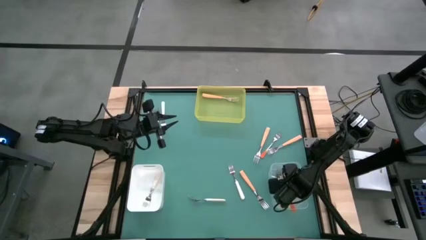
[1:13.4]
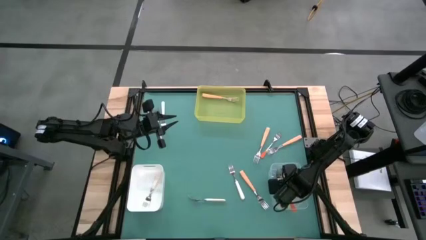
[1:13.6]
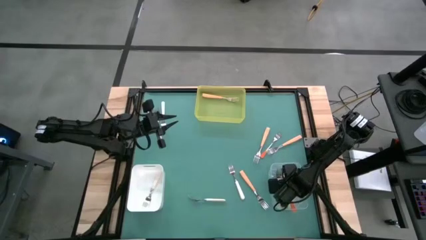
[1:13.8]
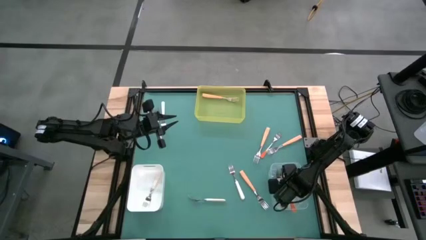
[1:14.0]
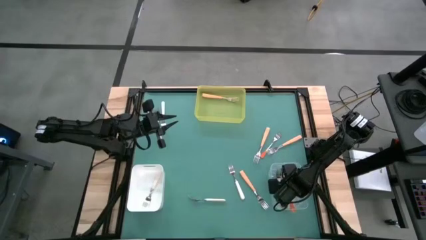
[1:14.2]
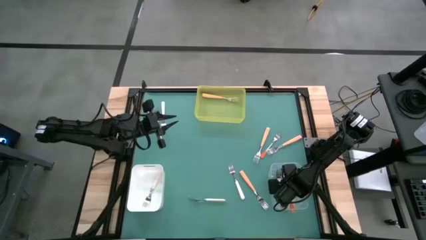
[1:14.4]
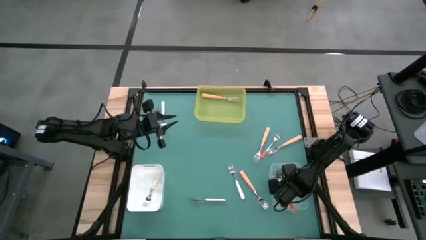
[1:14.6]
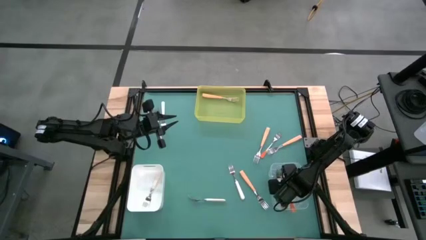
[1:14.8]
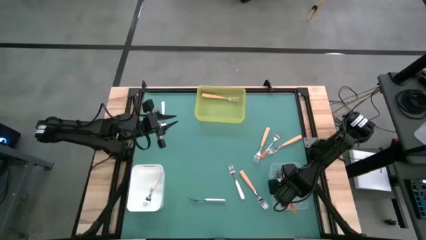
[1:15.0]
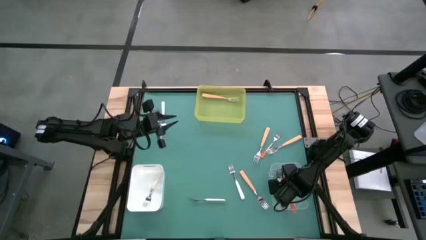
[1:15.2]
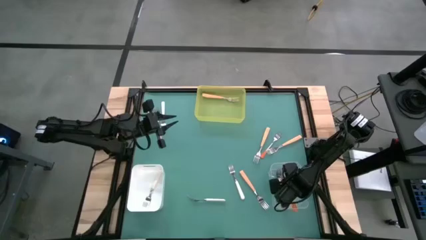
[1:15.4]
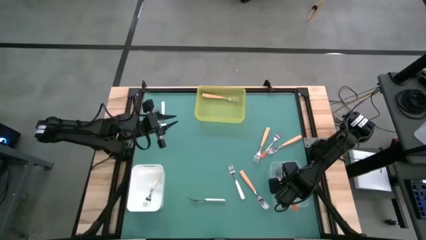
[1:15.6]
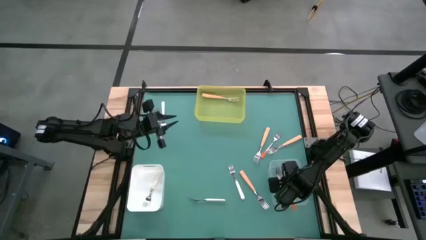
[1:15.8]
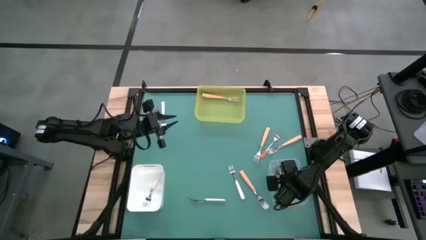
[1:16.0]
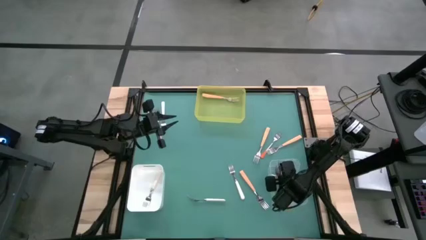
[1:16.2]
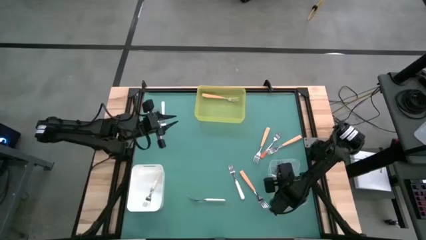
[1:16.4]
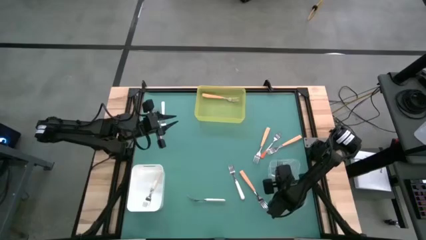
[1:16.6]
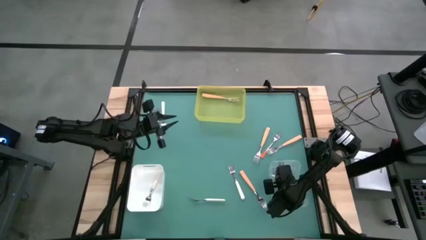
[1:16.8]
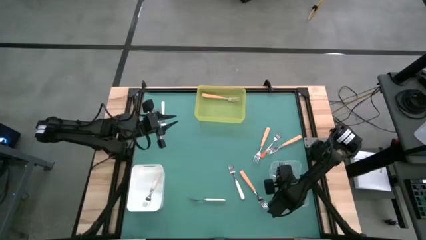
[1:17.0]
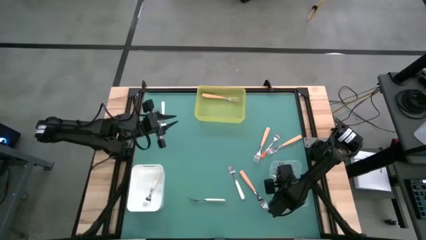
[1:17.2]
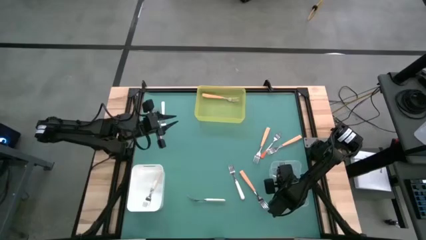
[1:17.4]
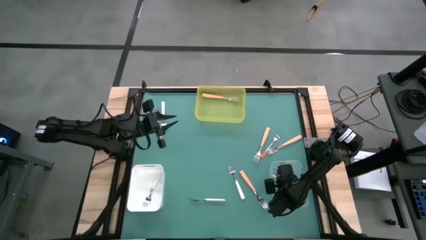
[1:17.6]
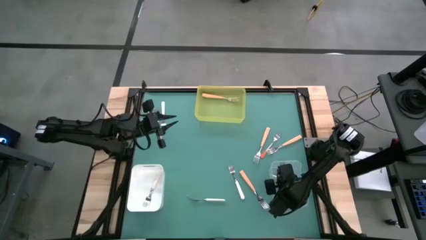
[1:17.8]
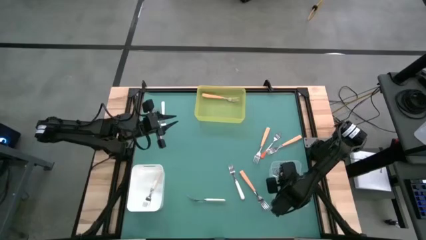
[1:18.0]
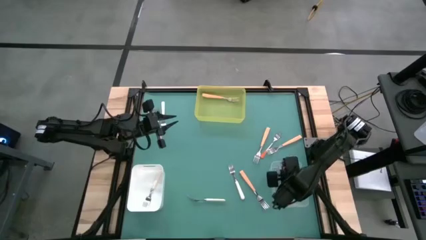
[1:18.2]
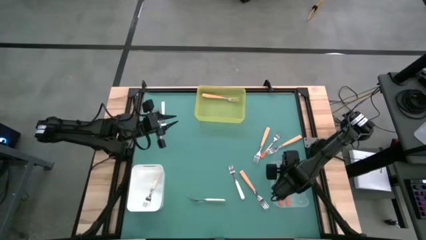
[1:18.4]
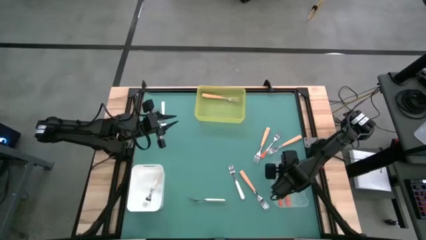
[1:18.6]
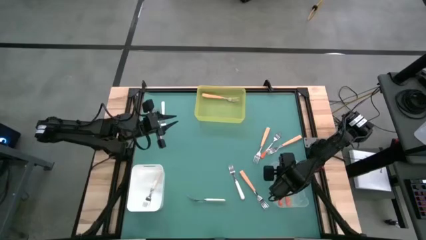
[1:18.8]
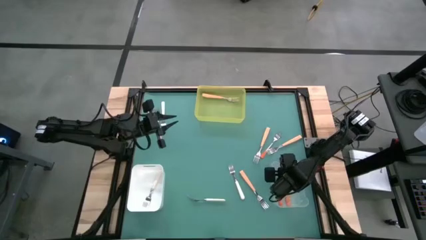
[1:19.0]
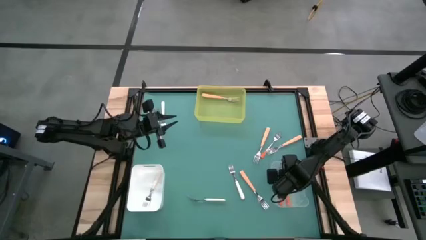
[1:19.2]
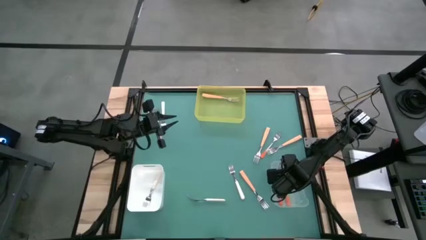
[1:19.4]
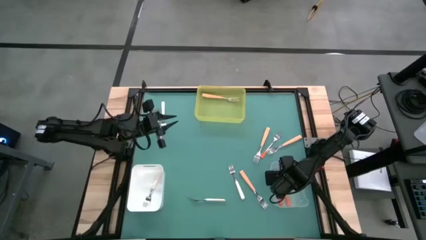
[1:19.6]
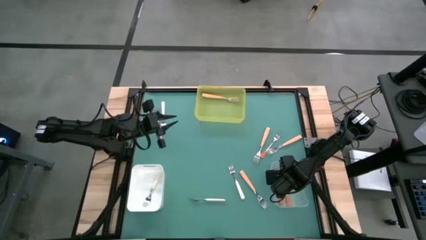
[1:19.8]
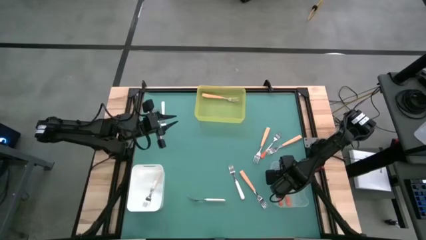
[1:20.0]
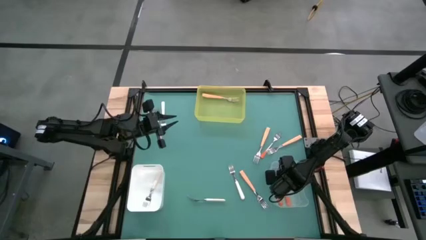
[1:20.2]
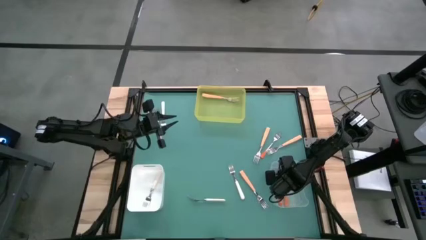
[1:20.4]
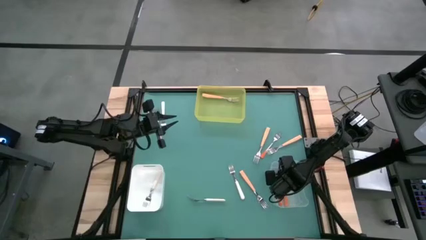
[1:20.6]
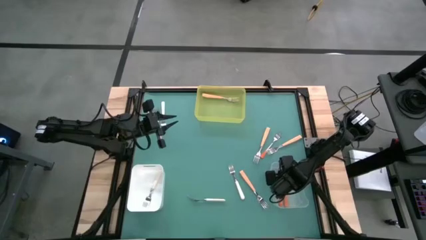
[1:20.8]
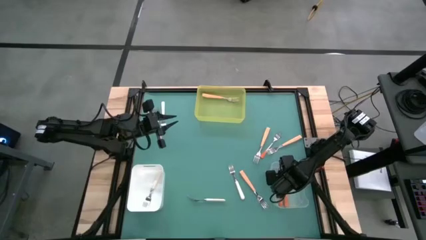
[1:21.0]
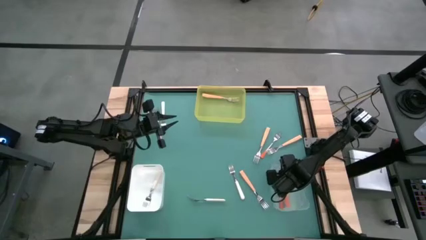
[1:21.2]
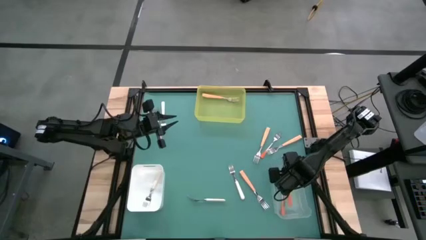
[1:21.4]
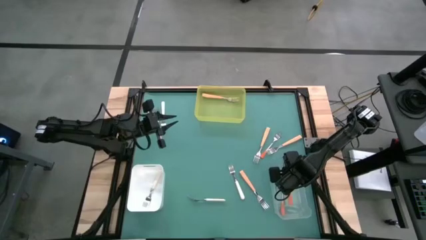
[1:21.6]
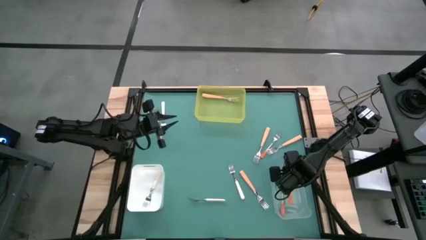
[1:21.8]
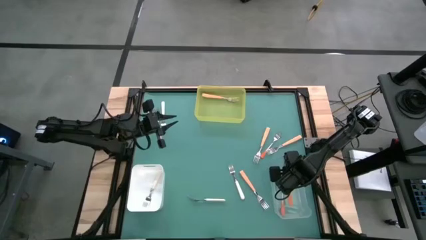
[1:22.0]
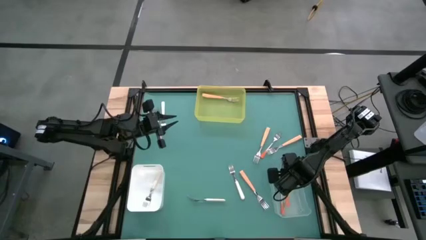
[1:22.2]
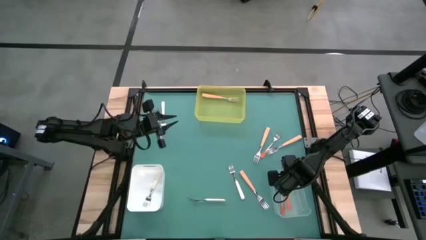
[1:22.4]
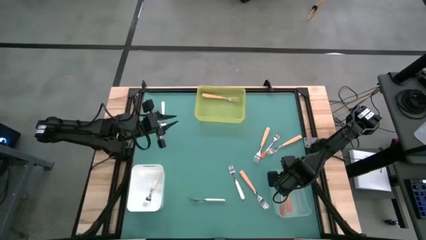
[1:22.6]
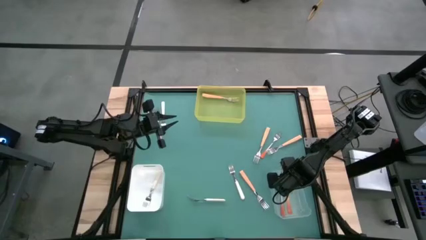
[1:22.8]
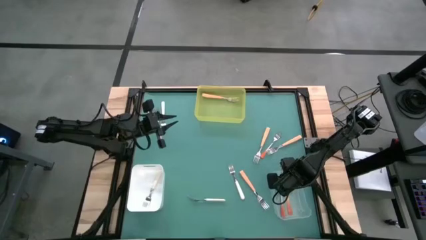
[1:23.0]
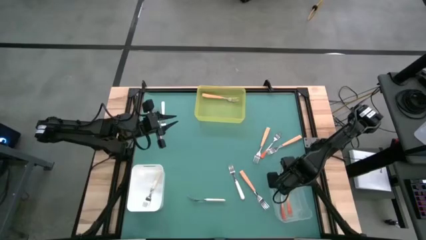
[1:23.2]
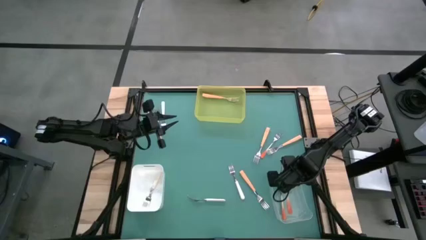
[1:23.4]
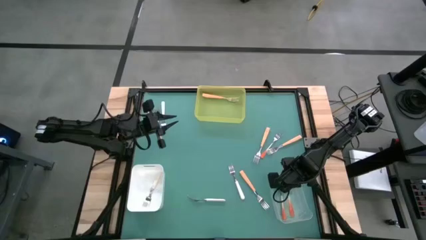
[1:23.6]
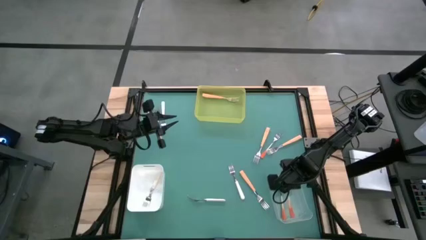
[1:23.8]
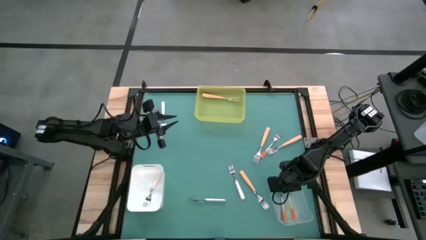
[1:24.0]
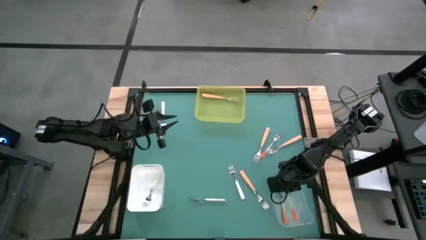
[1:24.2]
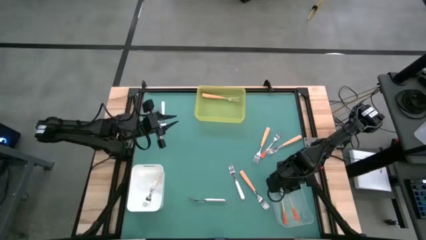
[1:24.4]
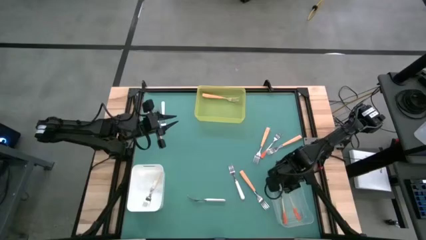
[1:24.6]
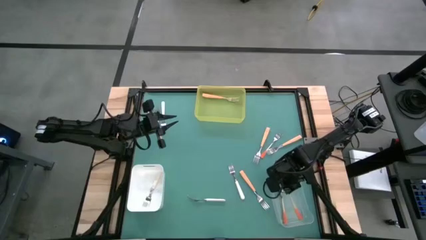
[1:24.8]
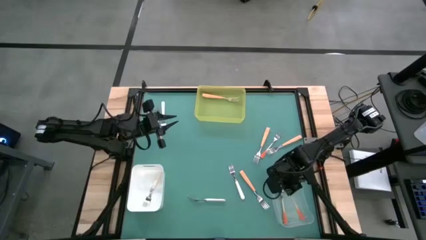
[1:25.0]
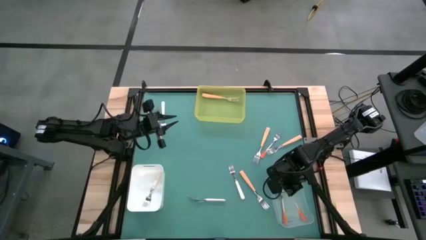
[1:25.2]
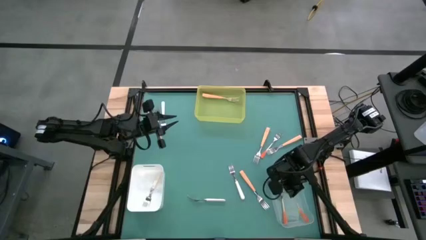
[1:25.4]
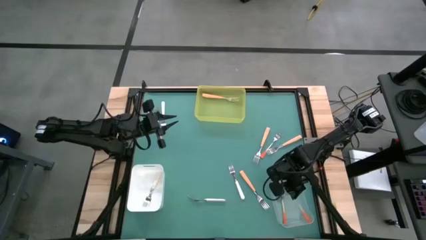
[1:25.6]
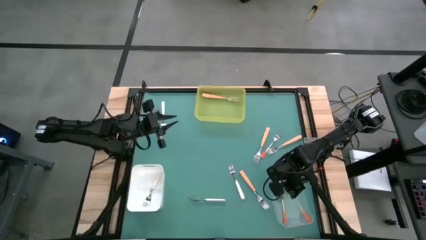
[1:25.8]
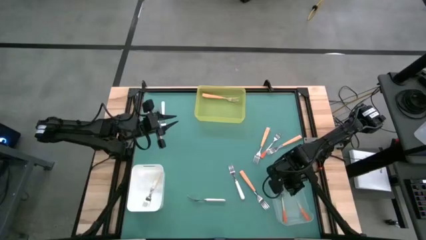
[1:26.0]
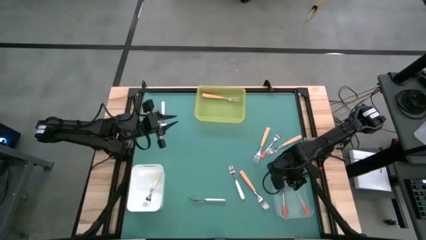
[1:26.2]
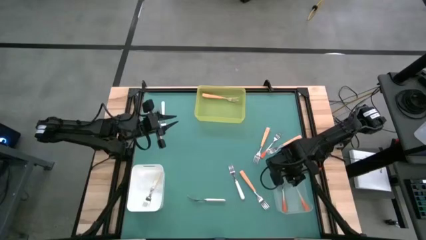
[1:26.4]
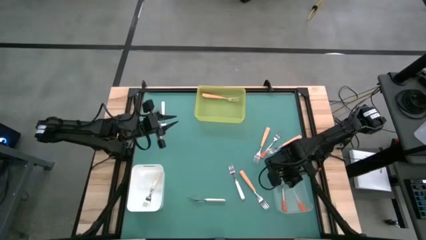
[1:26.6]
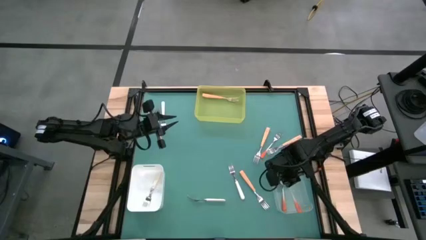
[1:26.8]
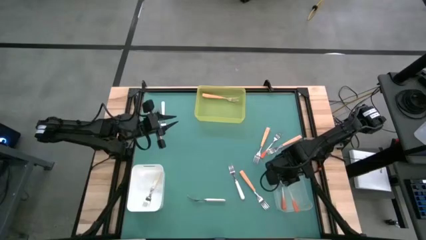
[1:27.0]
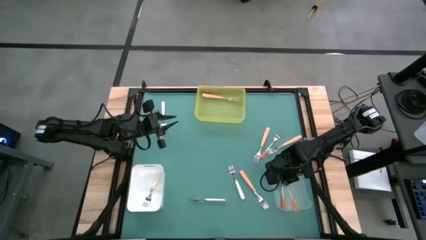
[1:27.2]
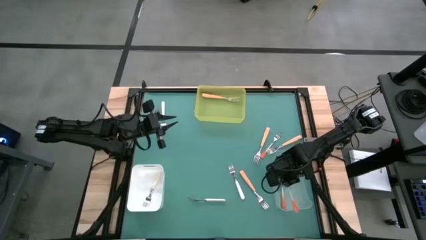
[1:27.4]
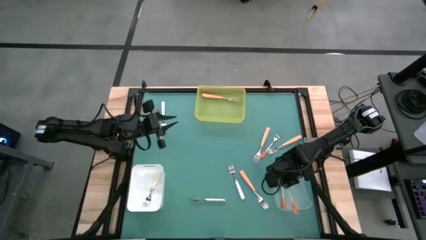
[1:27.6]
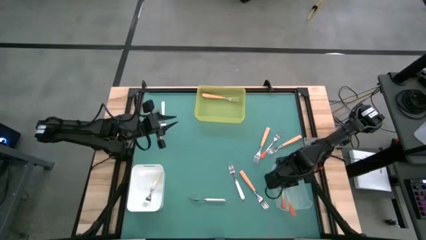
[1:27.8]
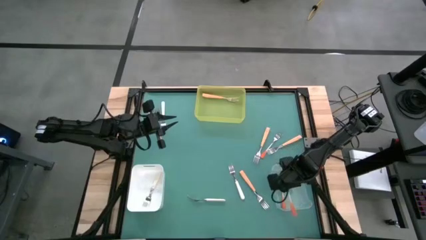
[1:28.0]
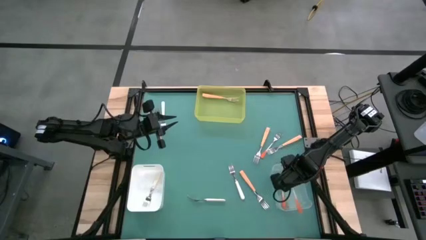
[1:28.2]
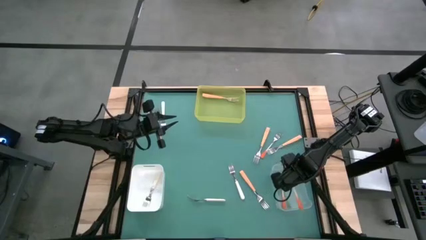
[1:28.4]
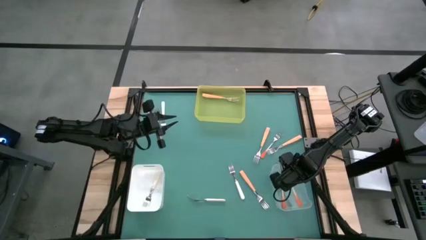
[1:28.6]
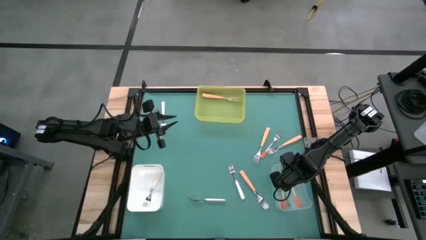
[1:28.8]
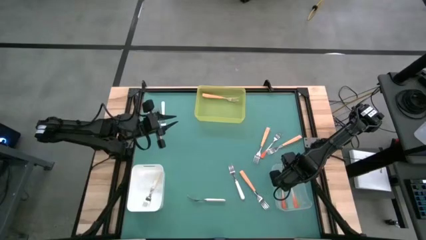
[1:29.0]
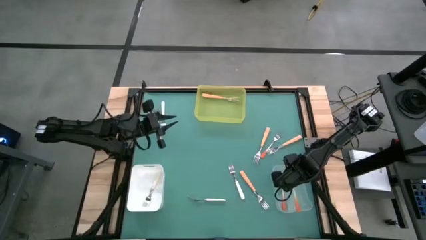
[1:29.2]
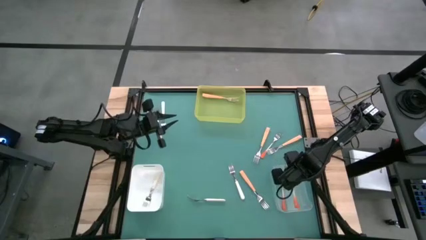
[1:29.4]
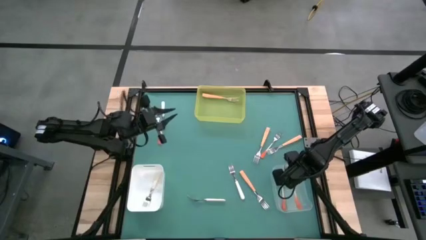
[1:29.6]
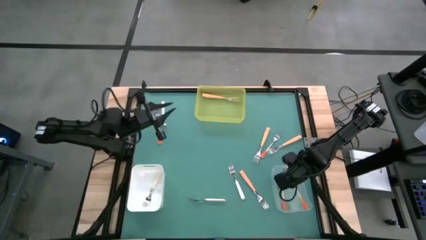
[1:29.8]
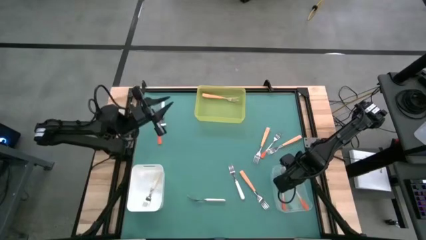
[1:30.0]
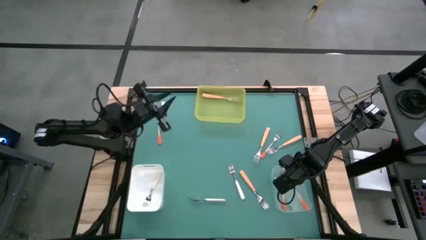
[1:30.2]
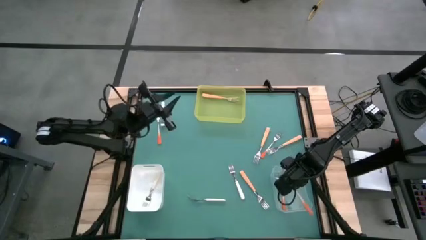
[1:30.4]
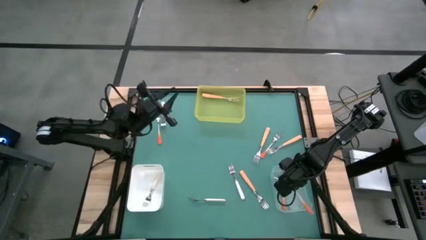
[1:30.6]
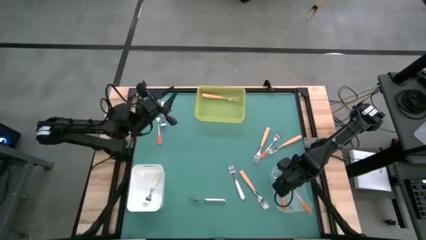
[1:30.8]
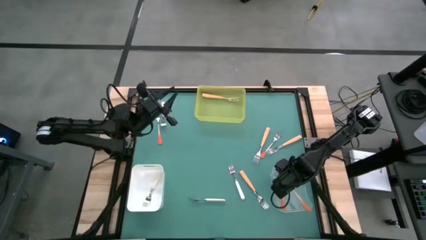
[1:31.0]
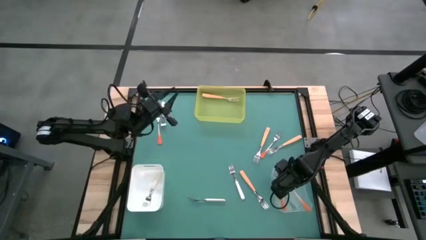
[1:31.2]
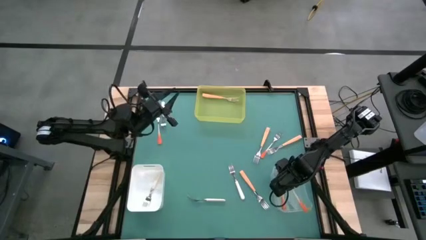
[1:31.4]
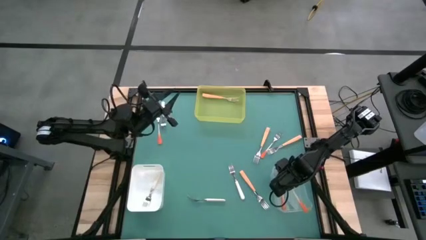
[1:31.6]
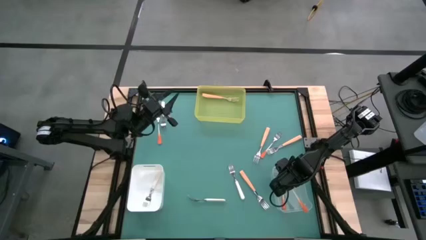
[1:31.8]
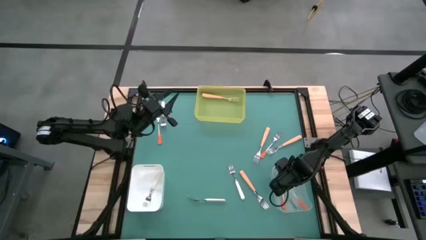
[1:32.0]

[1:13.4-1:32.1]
Task: Sort silverware by color (type)
Put the orange fork into the transparent bin
